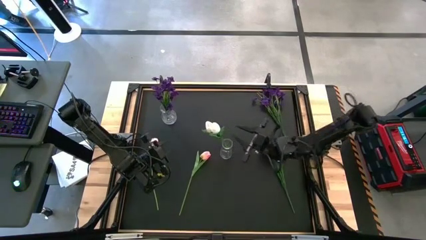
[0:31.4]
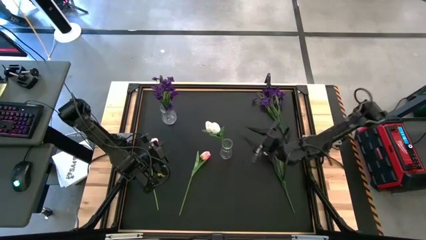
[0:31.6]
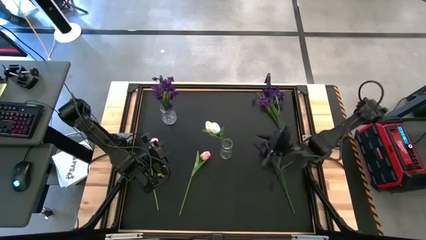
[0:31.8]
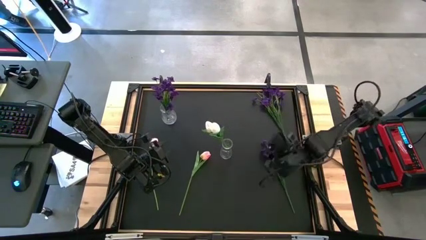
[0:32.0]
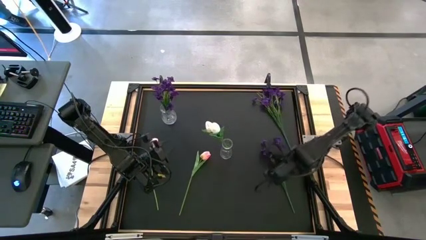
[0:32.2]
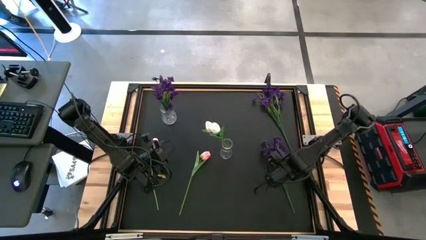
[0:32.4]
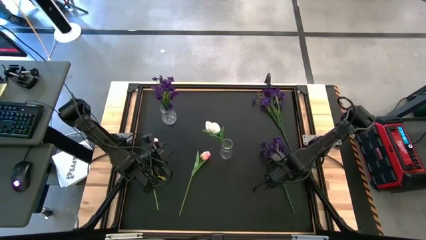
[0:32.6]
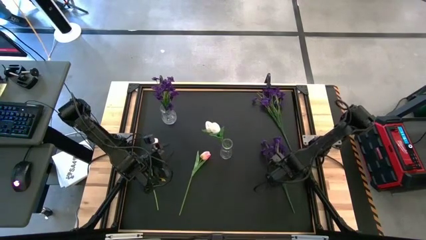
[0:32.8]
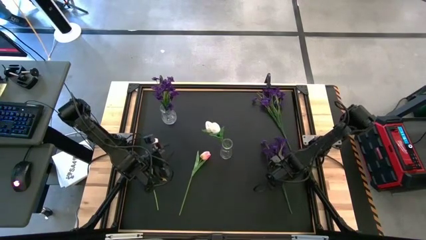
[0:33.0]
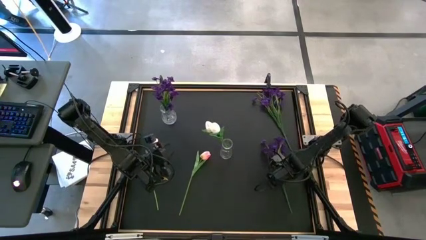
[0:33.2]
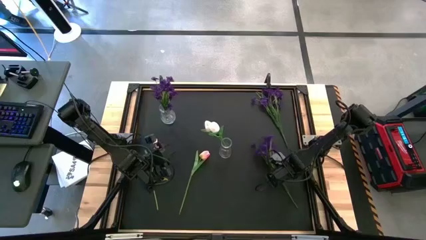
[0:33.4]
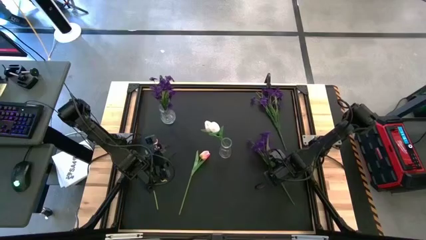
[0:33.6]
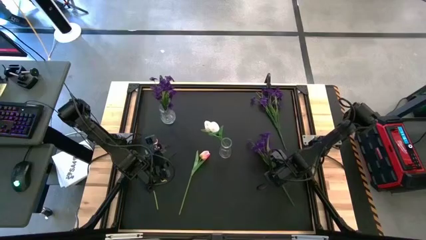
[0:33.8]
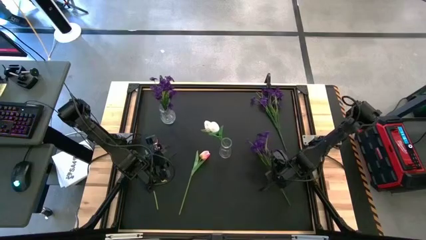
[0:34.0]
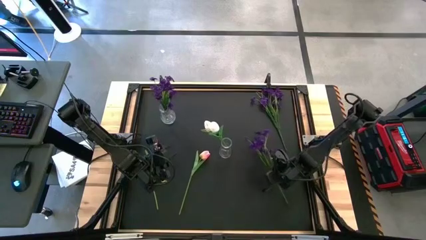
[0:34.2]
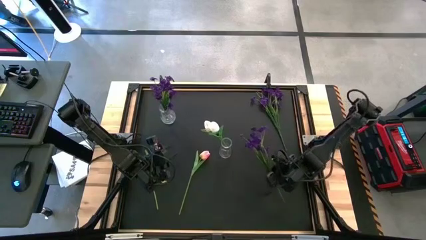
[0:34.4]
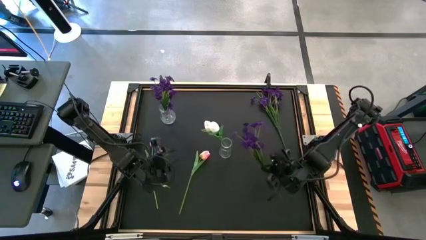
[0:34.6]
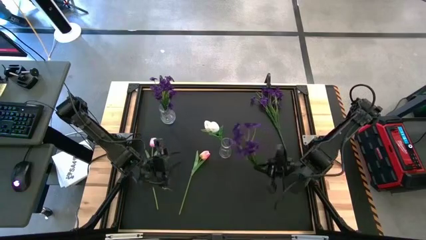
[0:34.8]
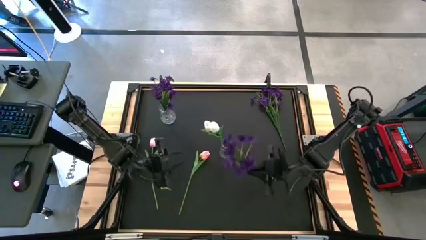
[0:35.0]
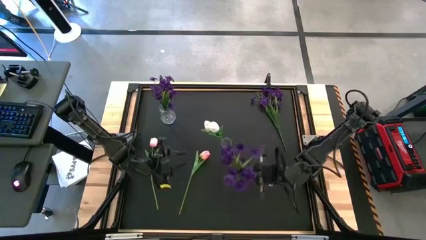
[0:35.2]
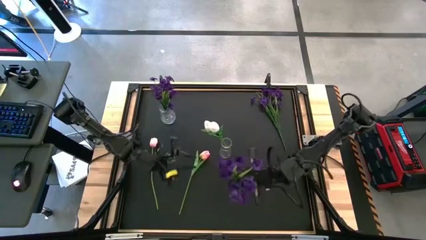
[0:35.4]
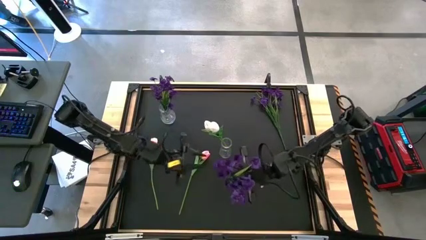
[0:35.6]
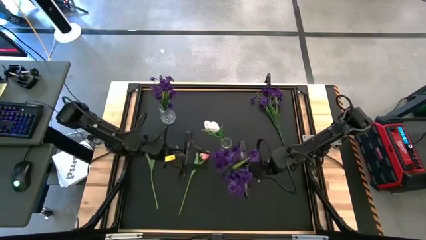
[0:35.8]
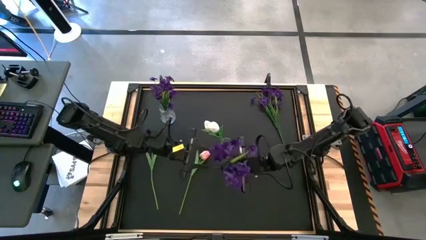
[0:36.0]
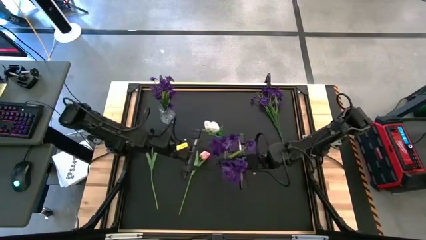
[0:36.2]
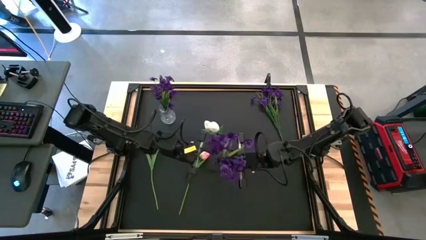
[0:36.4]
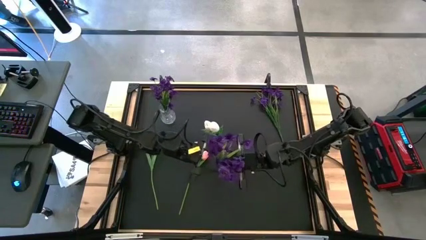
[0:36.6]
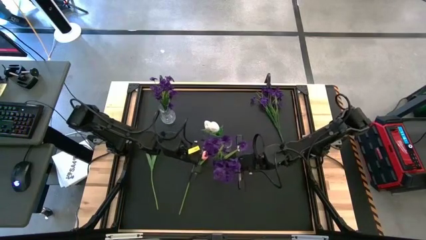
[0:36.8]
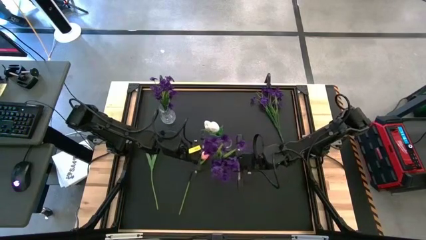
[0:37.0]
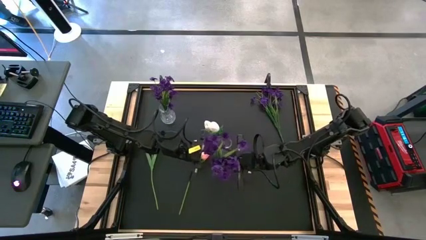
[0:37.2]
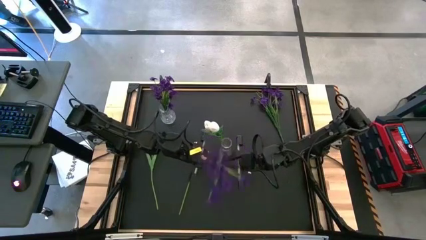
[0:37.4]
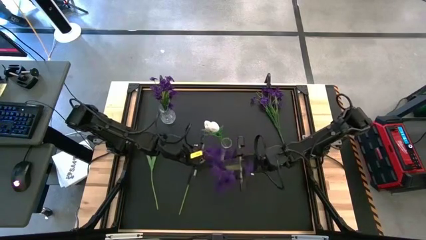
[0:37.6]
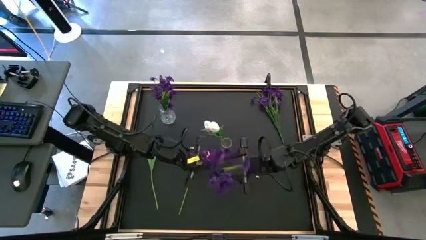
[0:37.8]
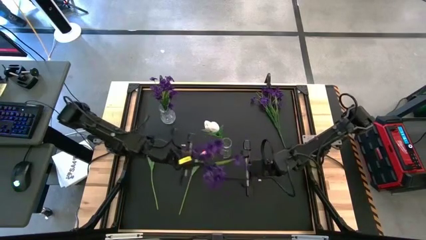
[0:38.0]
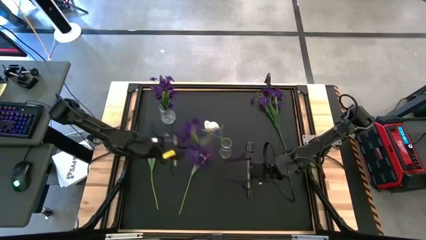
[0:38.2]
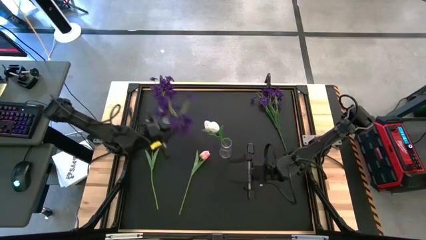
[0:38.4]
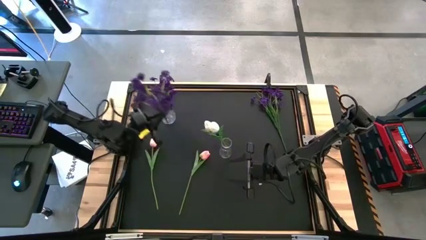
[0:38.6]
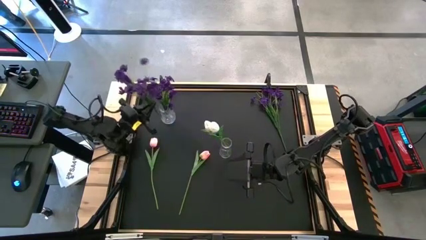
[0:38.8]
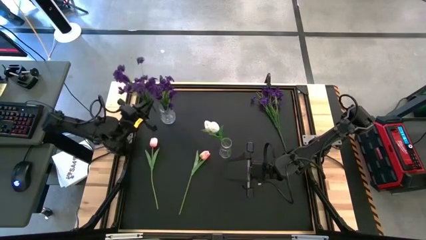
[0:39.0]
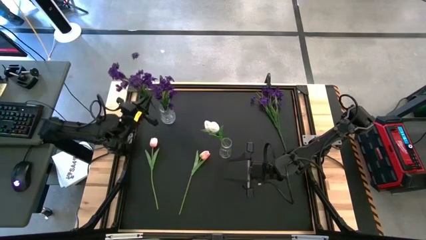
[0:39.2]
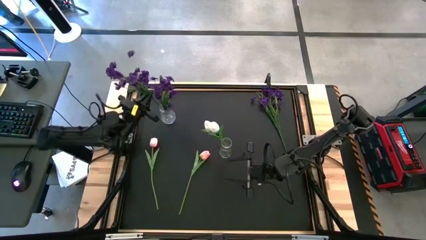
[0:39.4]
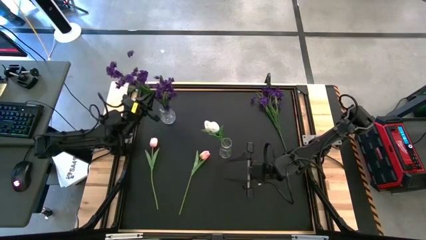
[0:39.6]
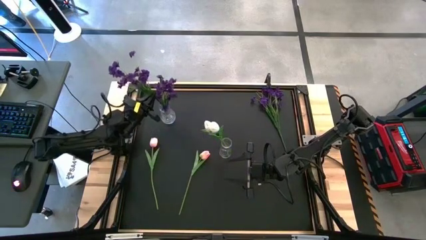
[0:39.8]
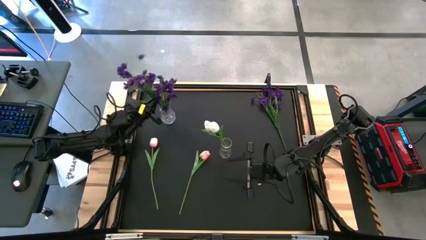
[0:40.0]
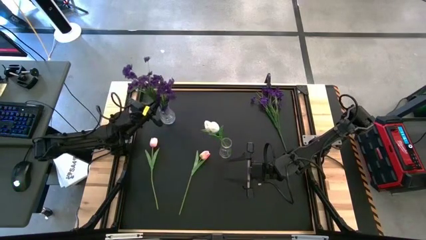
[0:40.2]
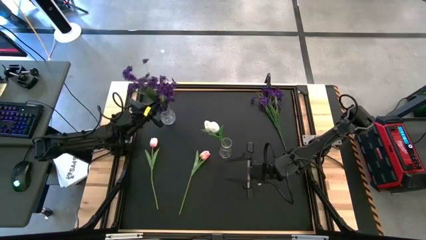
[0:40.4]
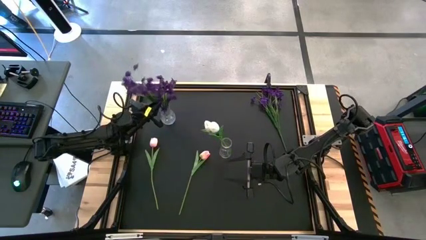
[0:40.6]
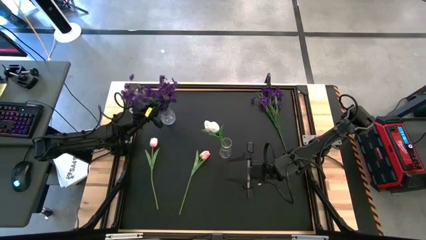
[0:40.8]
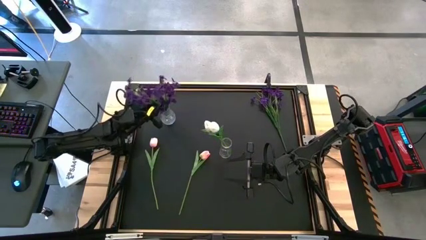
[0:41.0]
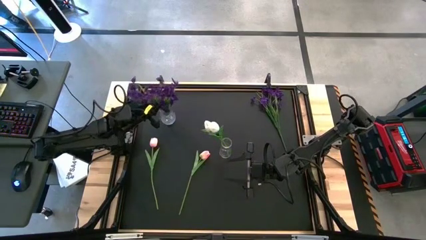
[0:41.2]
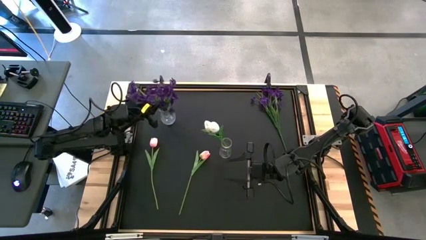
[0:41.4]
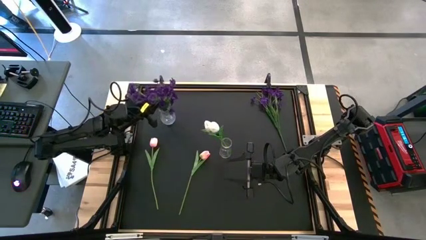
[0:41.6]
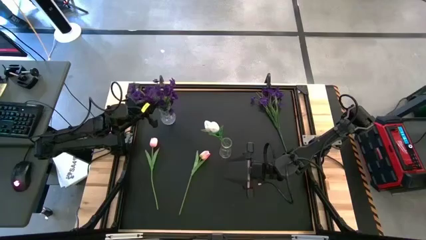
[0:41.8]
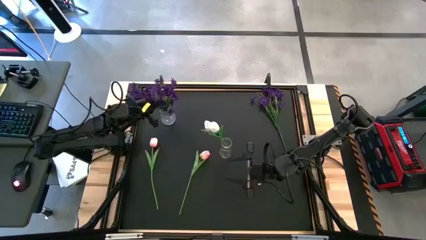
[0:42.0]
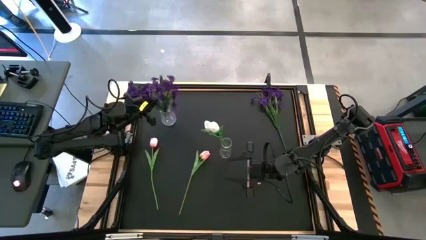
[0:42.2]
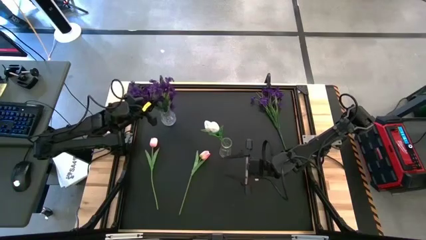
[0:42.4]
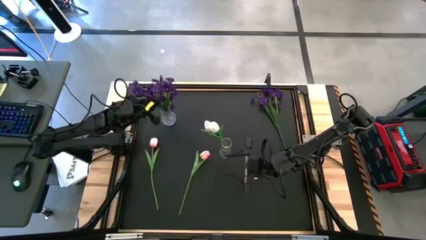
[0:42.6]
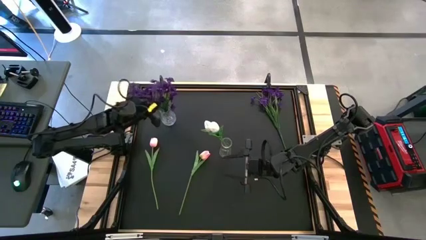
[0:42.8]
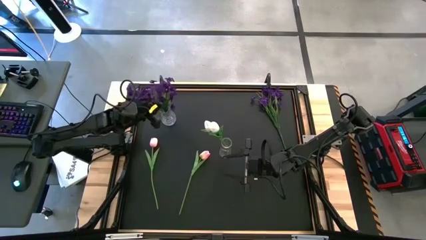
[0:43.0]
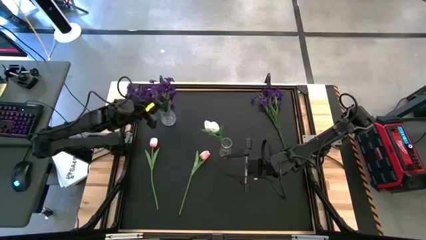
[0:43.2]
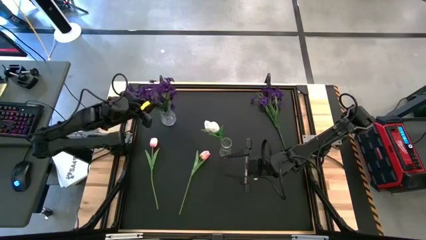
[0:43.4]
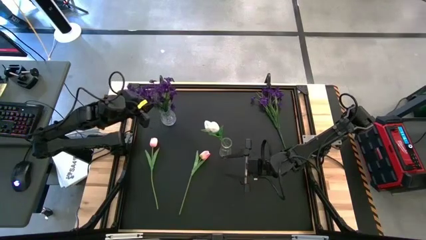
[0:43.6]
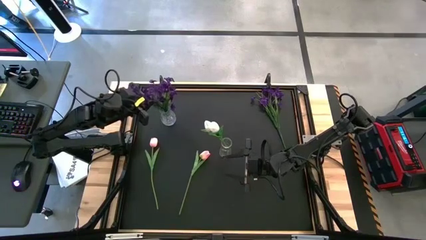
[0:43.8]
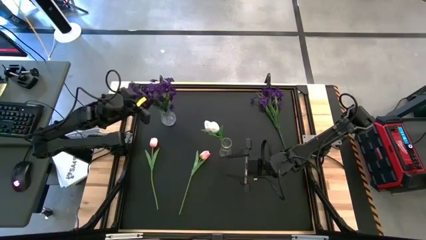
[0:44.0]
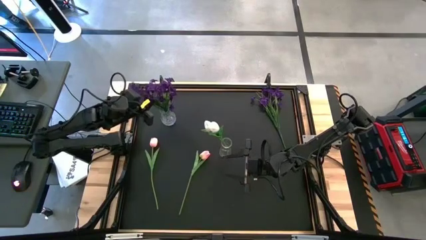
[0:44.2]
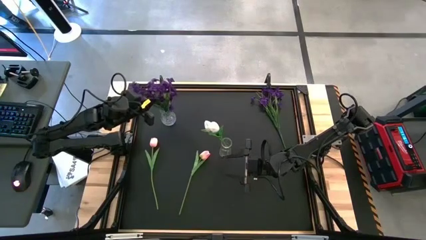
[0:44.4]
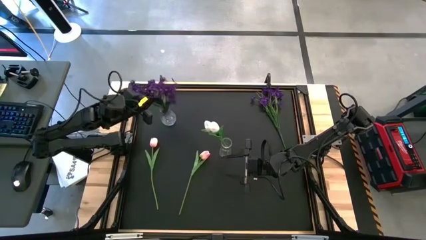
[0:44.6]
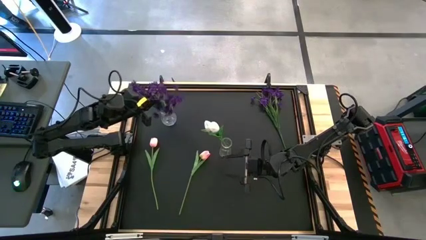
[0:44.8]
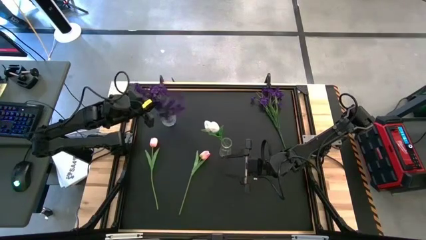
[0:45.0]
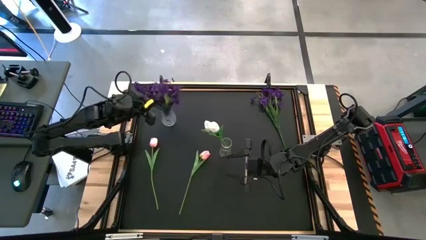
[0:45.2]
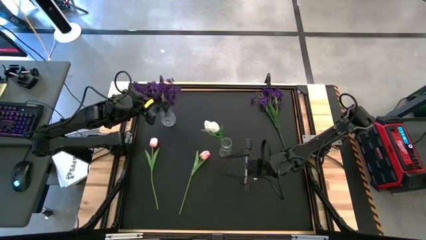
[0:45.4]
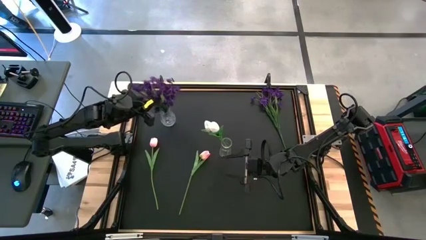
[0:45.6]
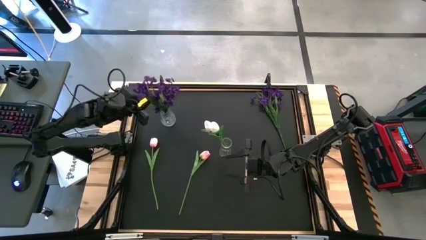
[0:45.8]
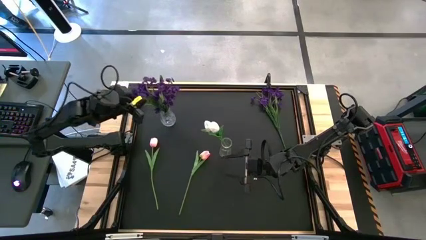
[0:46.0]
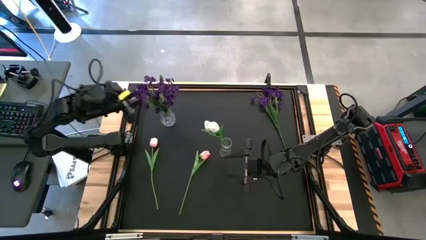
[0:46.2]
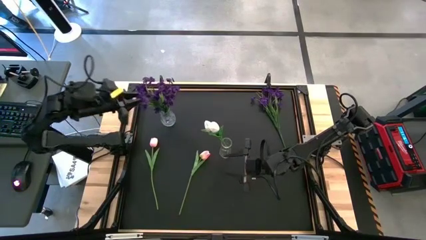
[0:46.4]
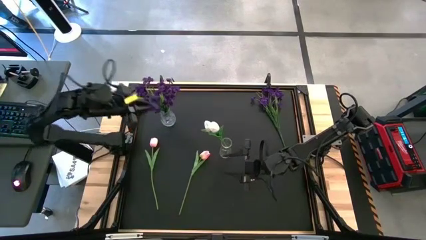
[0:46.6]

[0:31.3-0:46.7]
Task: Sort flowers into vase by color
Put the bottom violet flower into the left transparent flower vase
